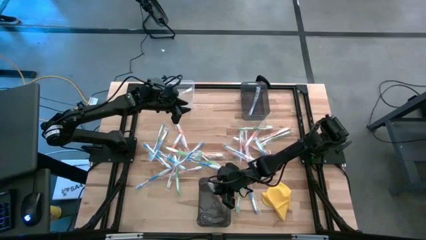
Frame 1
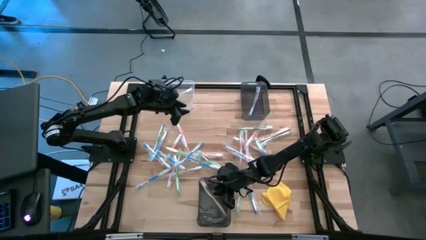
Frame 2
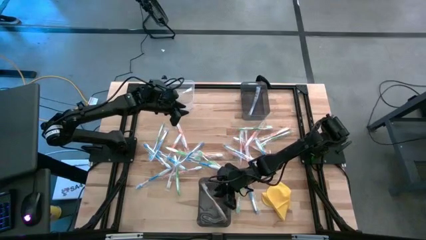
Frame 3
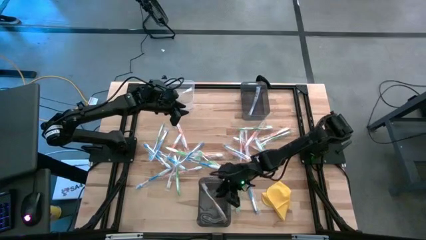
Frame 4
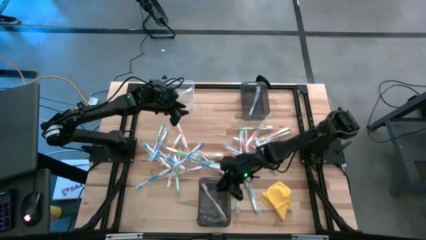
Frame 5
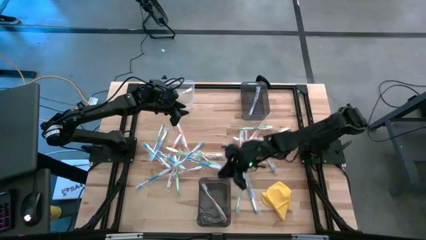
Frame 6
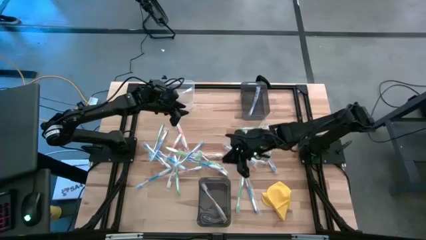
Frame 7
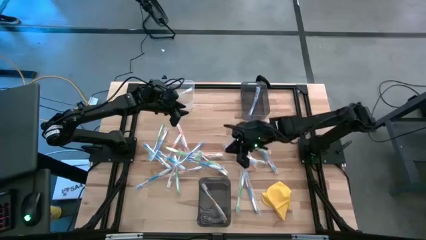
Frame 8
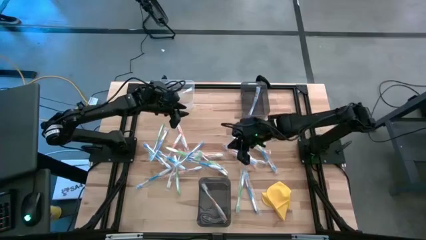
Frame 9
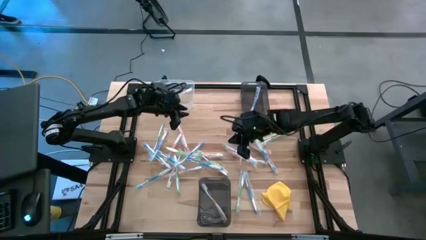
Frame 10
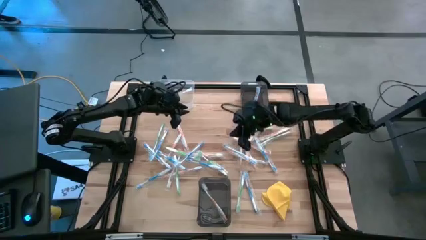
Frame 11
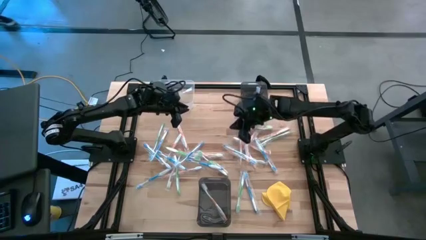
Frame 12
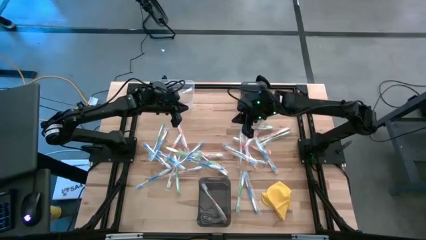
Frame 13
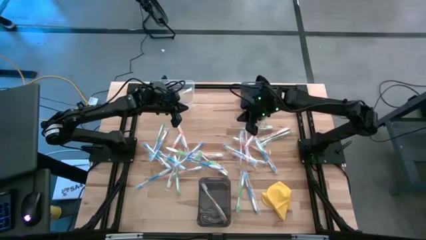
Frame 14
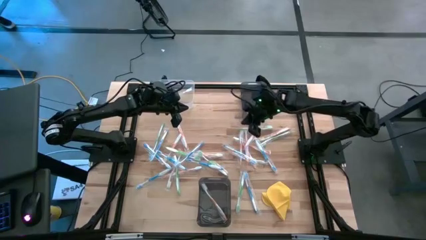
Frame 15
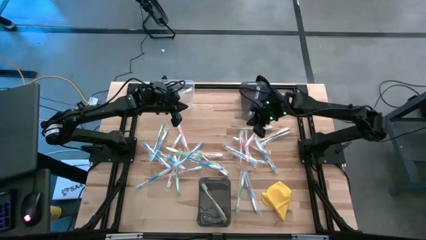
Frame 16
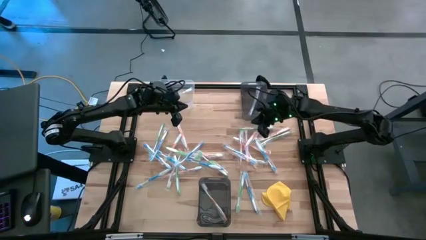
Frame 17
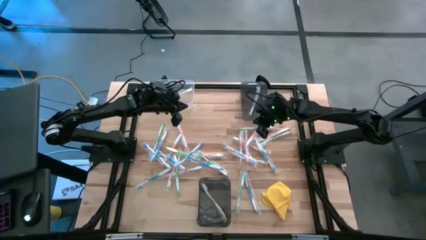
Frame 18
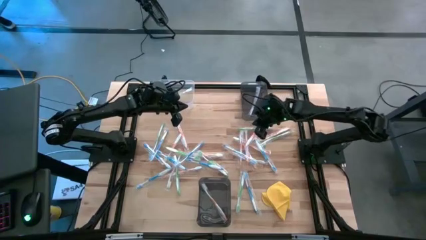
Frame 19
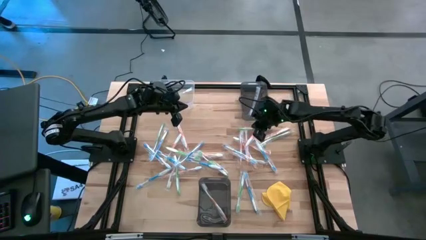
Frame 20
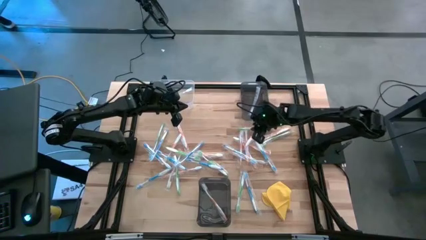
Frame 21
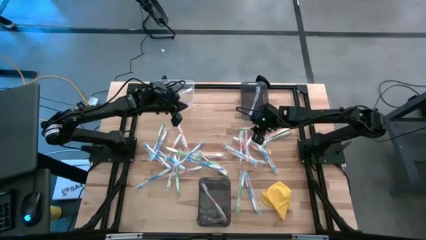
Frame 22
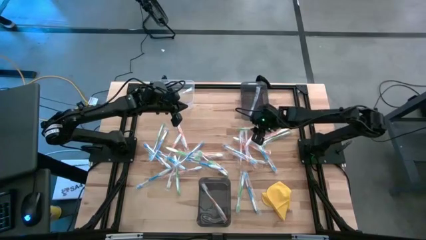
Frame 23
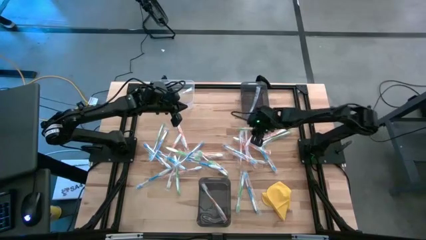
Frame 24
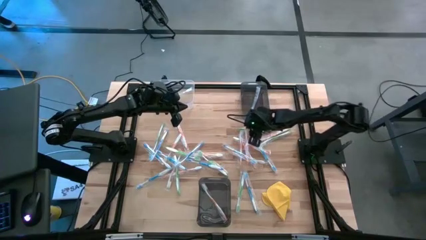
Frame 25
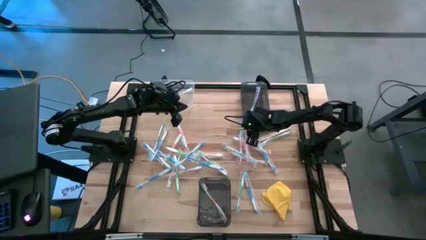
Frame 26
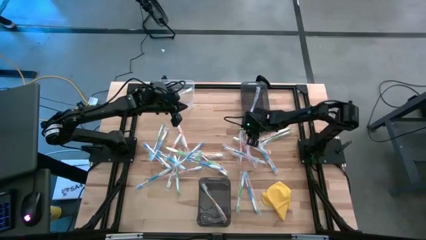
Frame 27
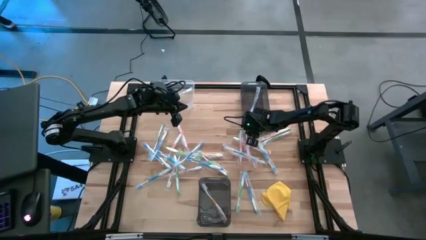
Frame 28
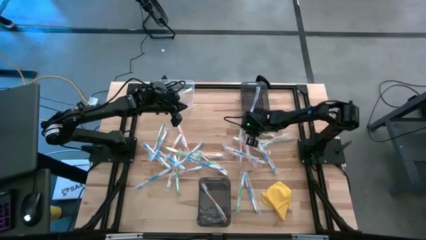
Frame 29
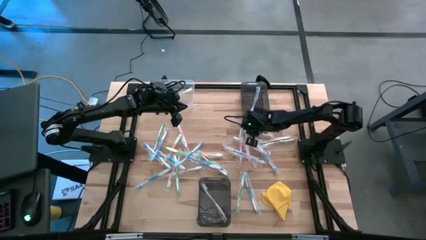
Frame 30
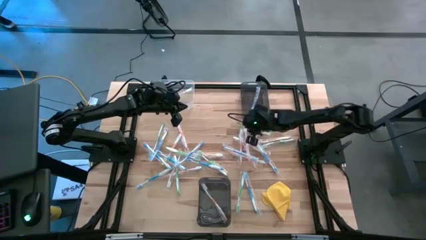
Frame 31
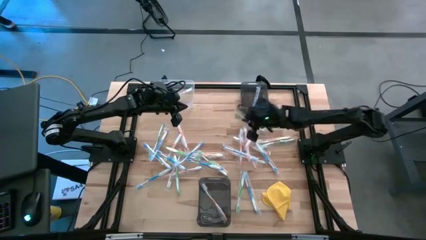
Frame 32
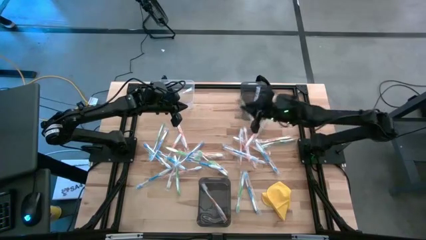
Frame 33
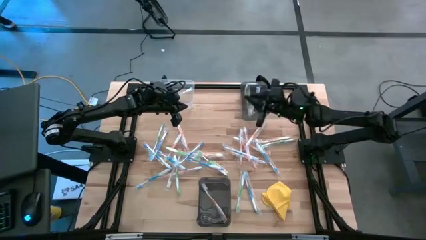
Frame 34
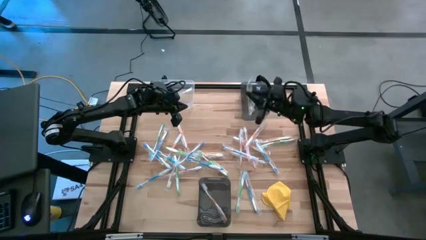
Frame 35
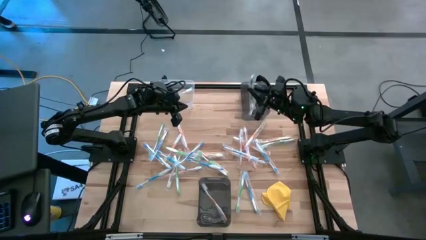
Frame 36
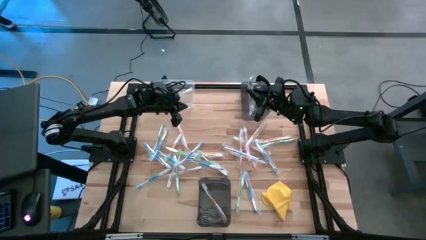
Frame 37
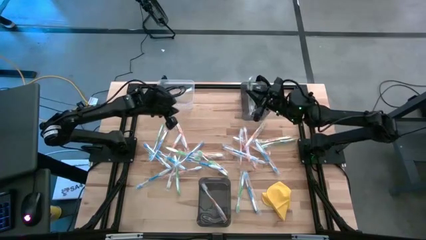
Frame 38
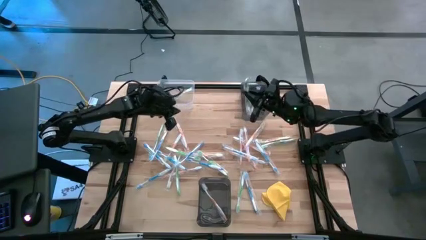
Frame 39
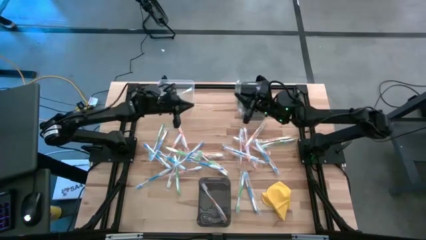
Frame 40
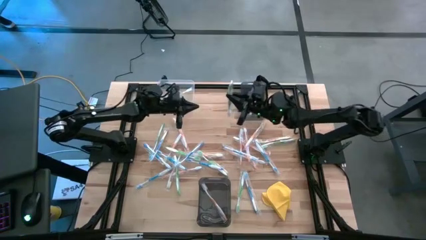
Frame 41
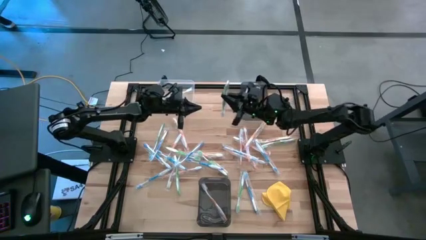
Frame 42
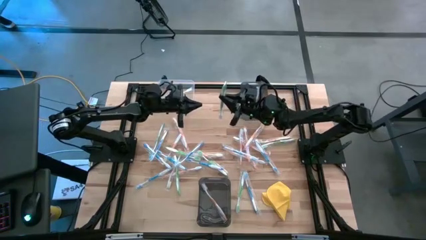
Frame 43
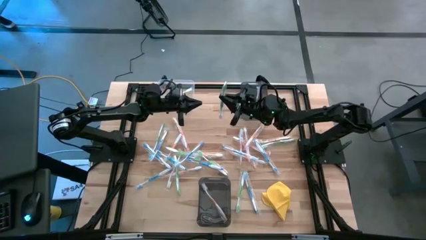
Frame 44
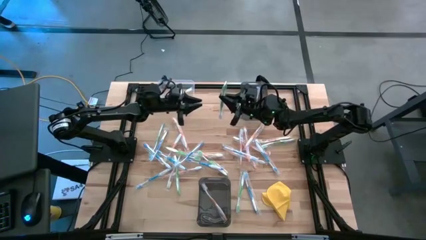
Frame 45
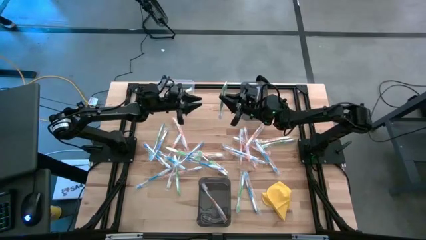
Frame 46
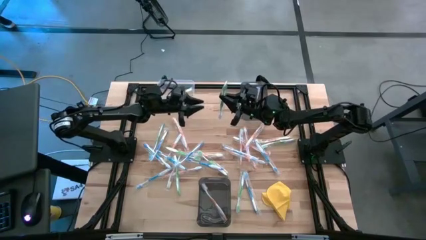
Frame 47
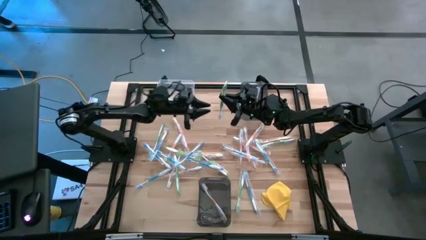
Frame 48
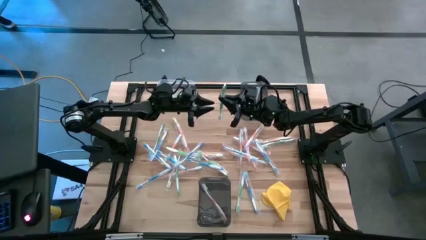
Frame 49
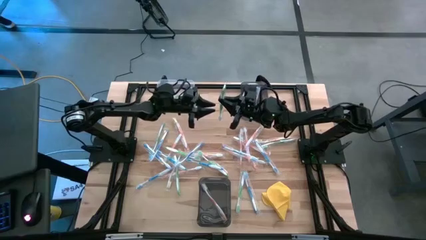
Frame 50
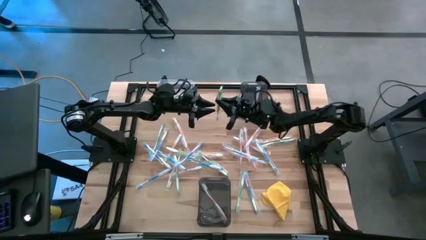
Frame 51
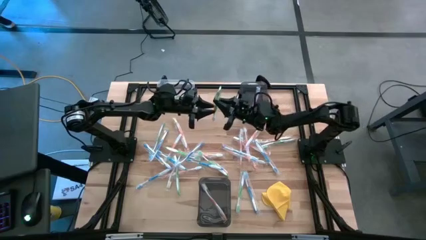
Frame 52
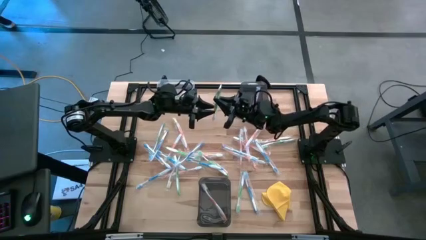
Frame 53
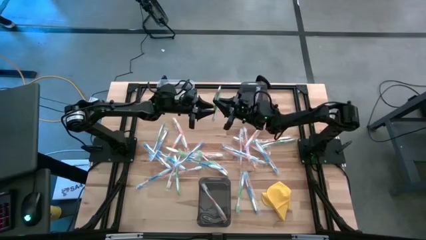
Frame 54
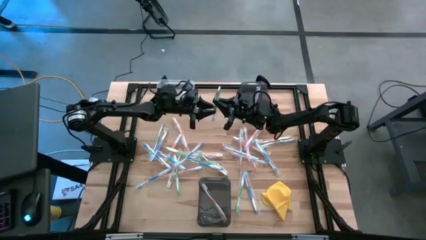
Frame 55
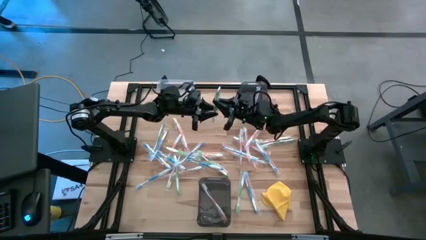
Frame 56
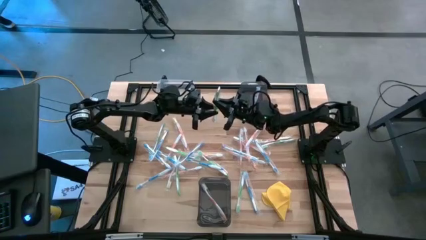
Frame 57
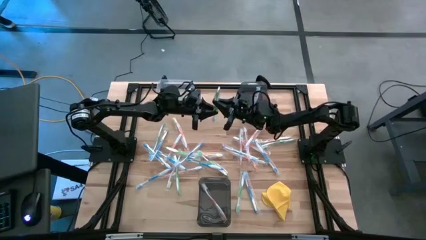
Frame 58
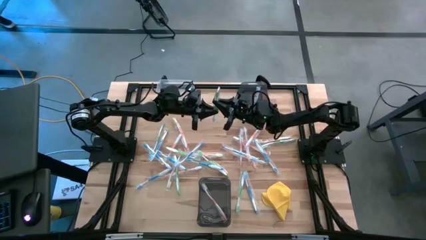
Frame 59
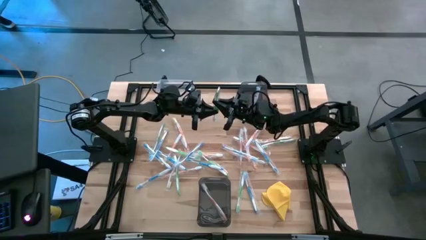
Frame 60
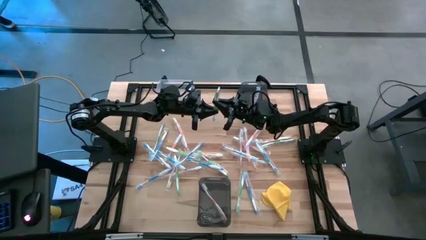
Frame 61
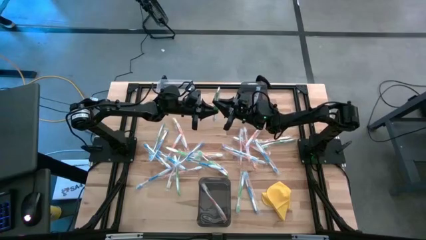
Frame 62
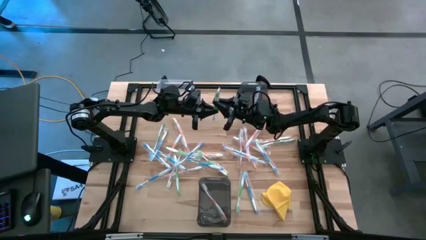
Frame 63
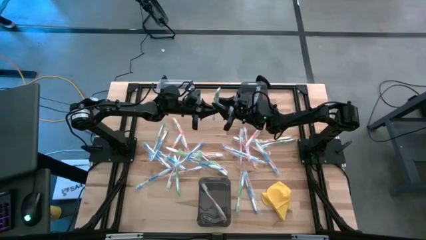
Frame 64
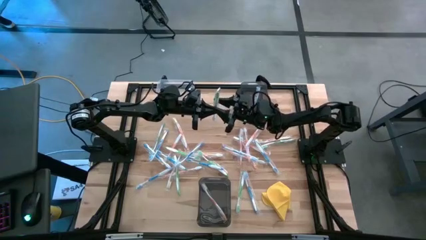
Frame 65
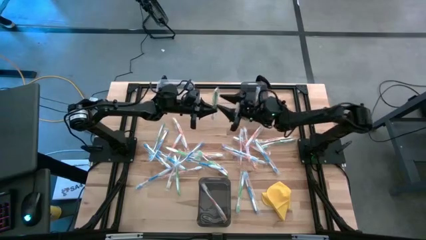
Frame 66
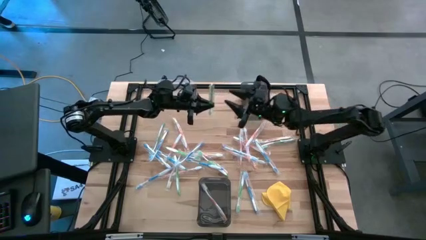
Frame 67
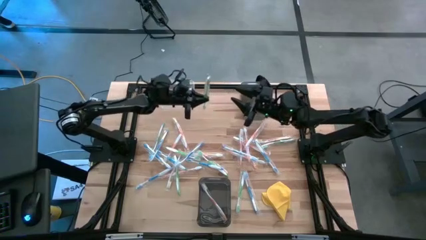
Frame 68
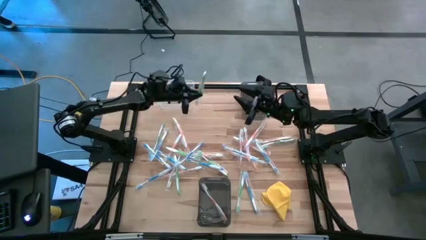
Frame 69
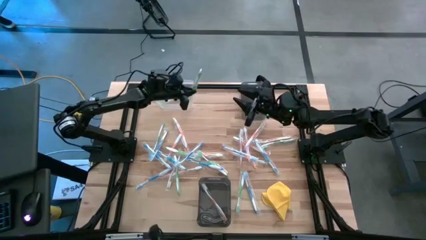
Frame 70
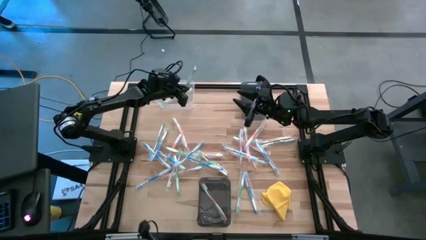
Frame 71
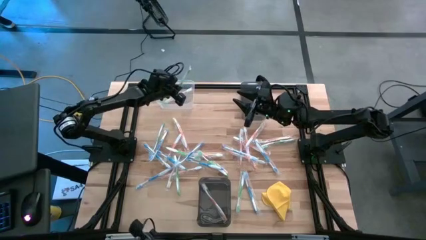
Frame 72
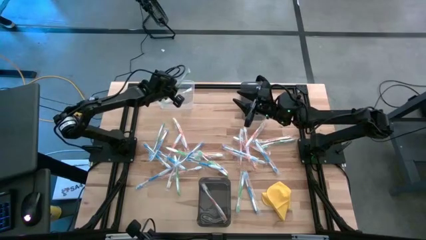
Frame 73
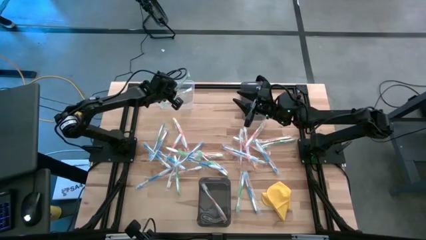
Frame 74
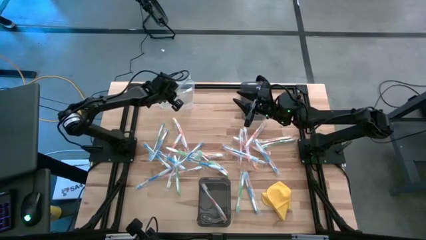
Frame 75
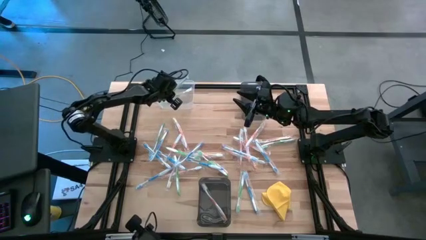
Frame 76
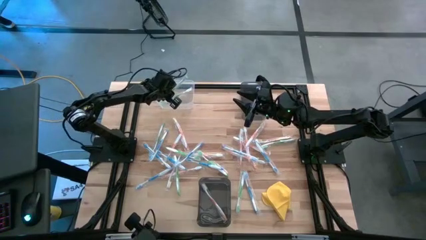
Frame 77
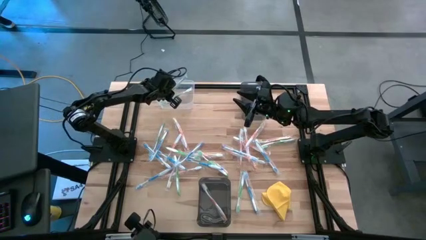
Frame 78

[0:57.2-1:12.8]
Task: Pick & Place Toothbrushes
Put the green toothbrush into the transparent bin
